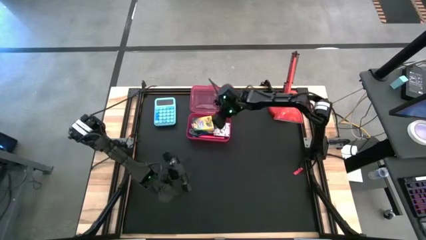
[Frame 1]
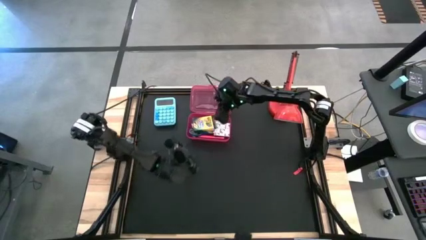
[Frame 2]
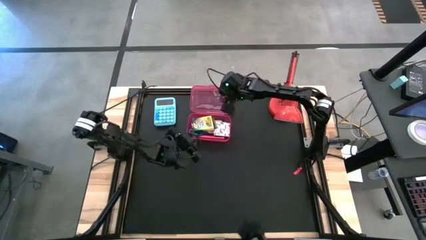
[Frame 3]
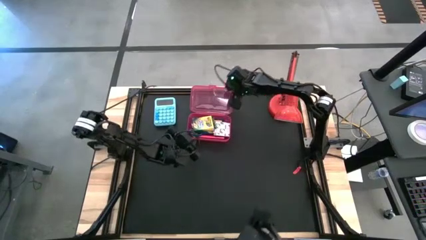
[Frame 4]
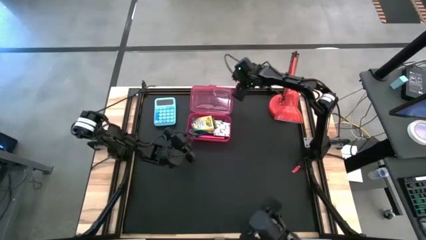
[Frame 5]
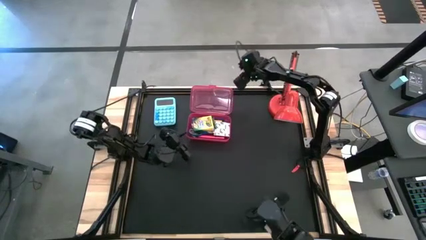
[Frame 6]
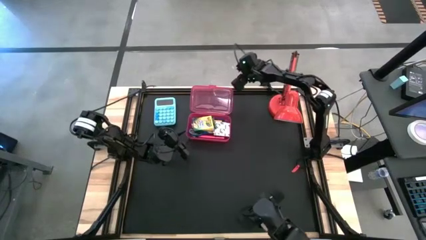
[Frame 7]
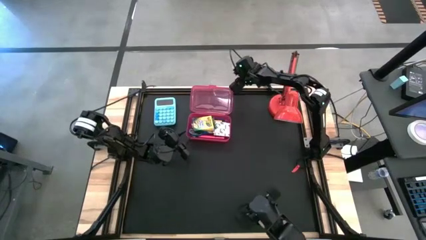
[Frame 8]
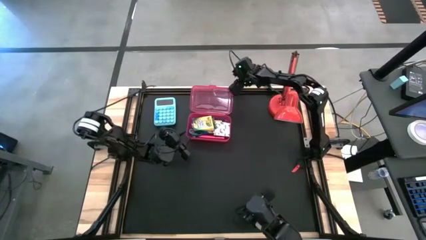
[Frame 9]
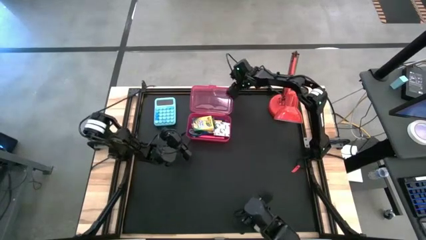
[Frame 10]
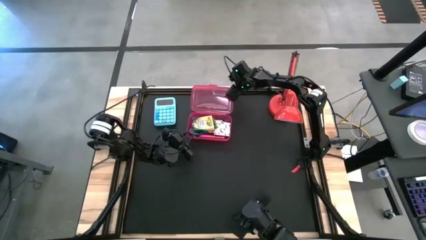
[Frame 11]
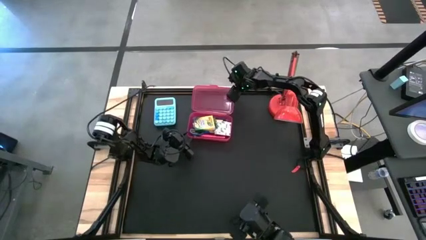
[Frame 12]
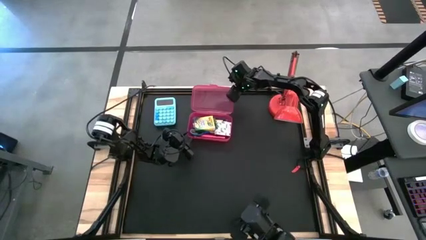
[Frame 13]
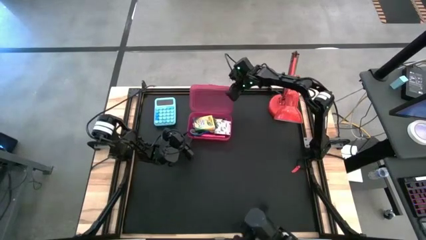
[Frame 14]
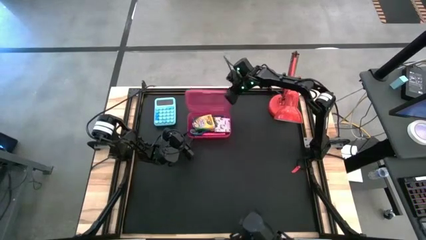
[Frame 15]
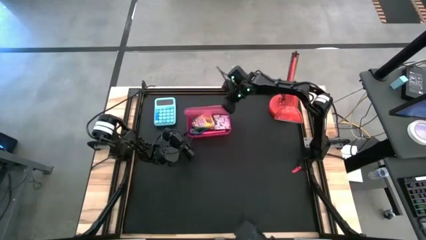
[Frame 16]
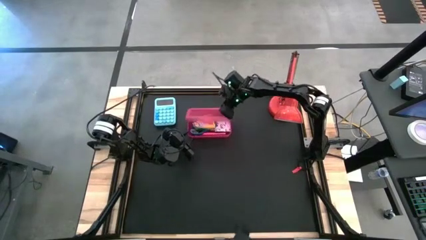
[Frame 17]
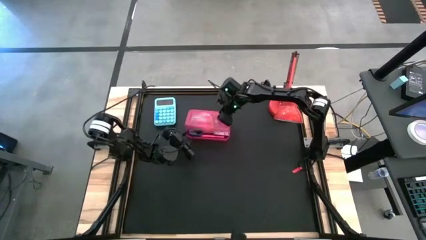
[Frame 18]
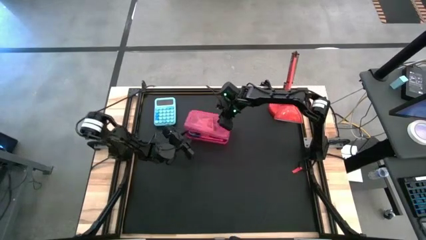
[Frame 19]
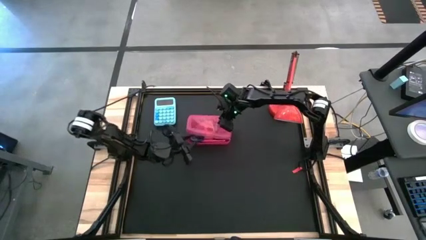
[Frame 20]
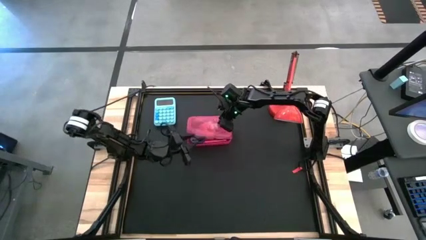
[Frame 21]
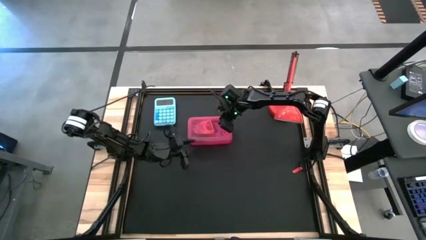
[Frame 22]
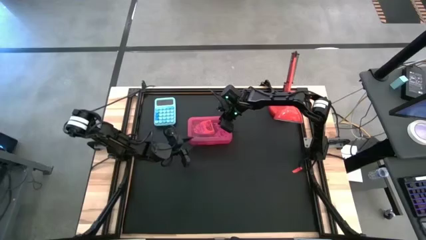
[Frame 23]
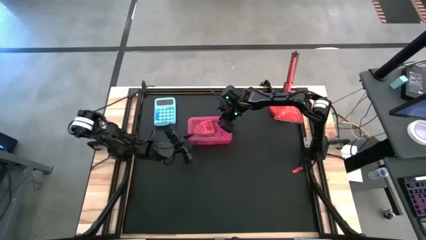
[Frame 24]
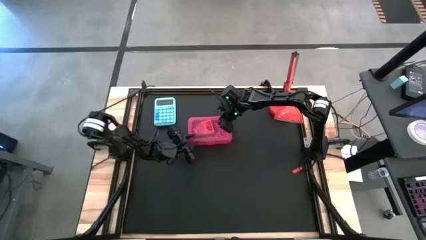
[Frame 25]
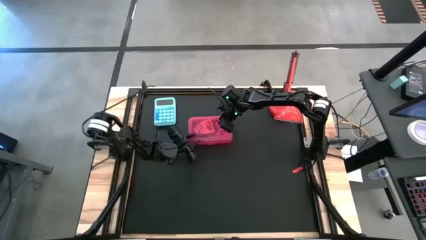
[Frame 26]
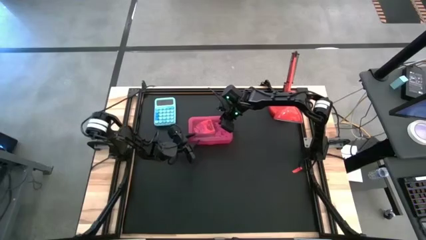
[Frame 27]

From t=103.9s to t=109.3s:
Task: Pack school essentials
Close the pink supply box

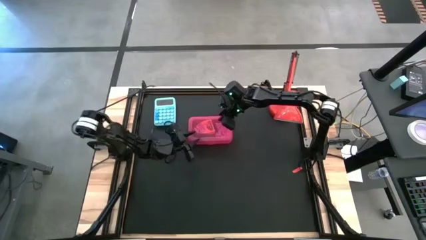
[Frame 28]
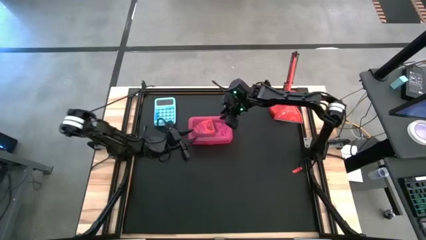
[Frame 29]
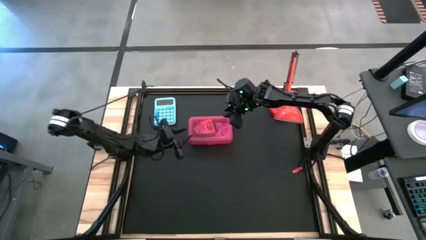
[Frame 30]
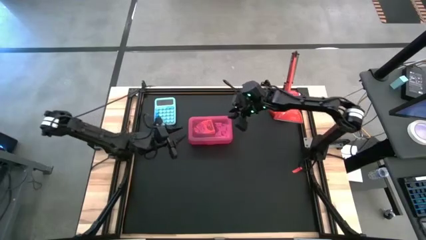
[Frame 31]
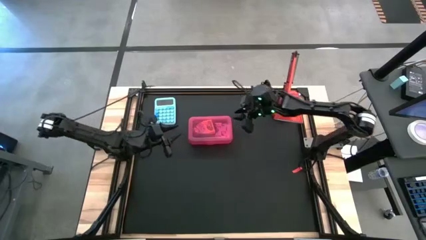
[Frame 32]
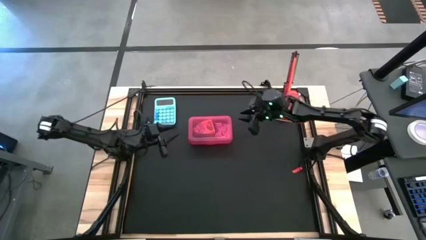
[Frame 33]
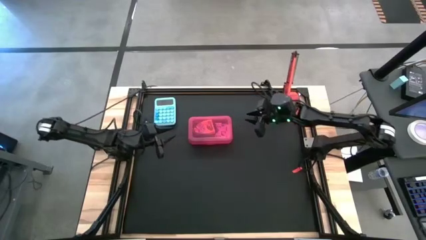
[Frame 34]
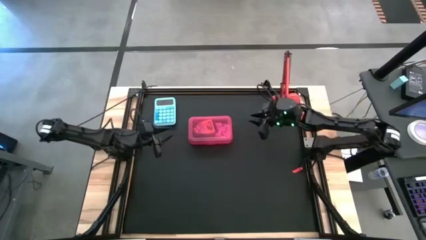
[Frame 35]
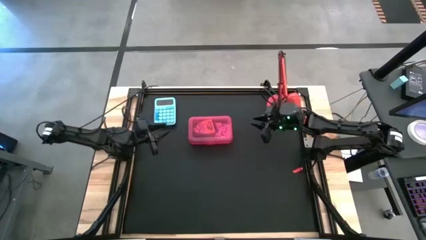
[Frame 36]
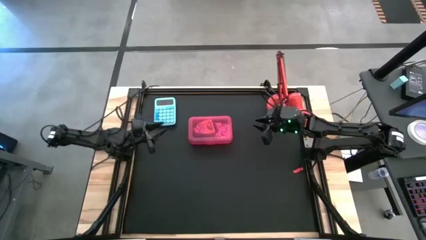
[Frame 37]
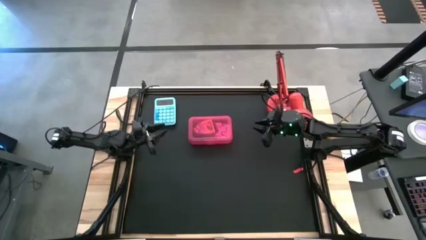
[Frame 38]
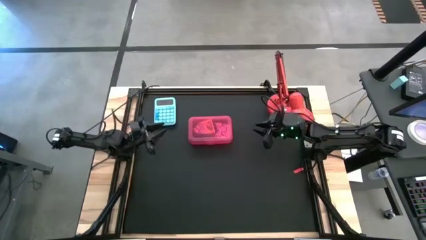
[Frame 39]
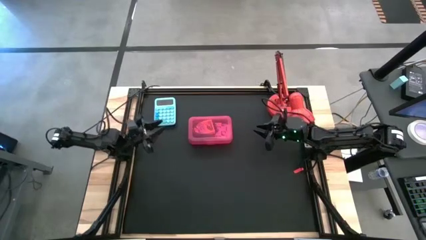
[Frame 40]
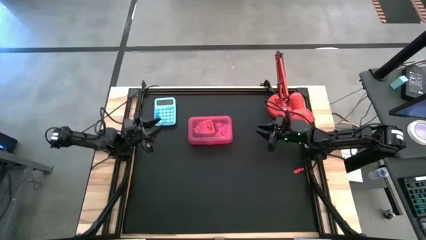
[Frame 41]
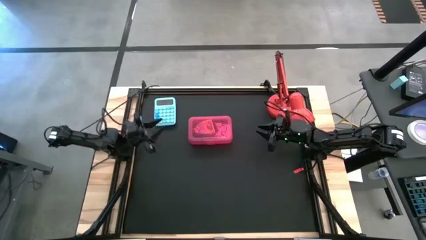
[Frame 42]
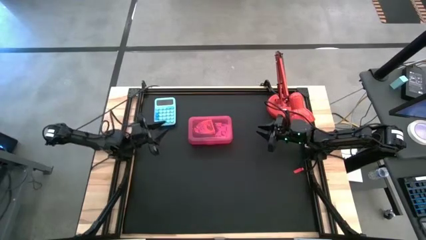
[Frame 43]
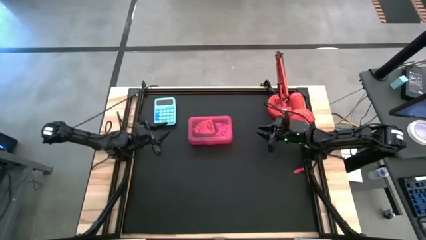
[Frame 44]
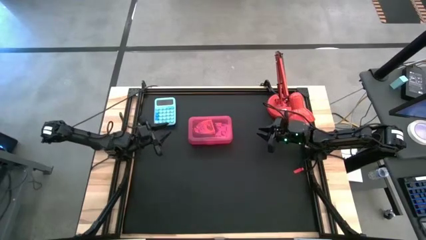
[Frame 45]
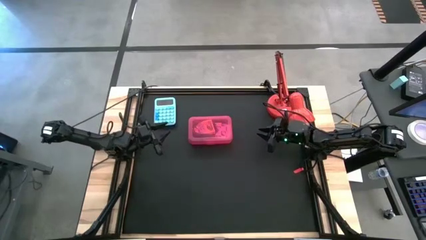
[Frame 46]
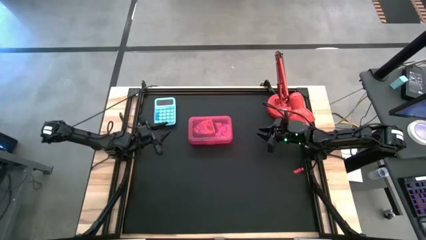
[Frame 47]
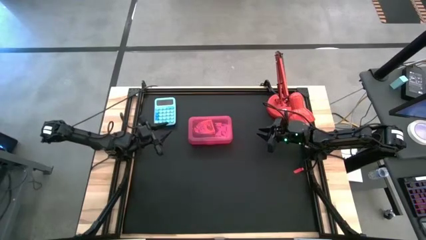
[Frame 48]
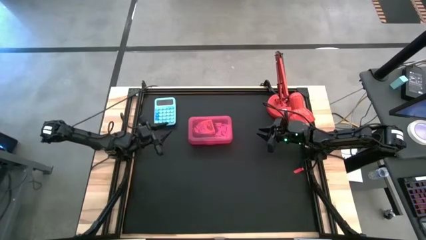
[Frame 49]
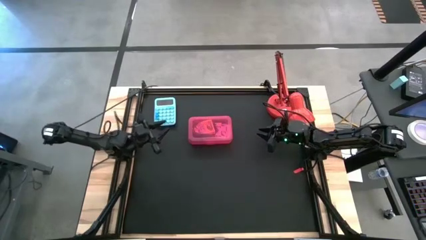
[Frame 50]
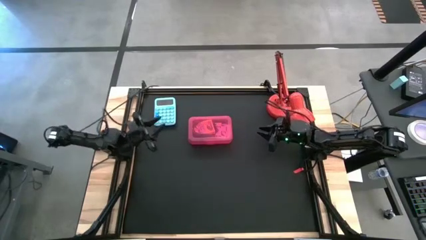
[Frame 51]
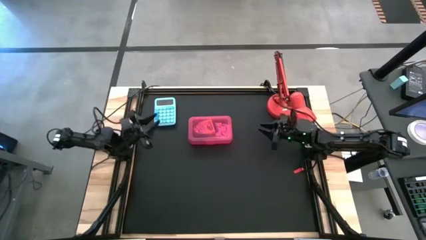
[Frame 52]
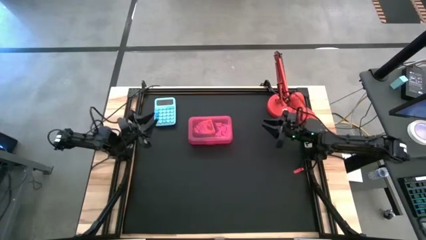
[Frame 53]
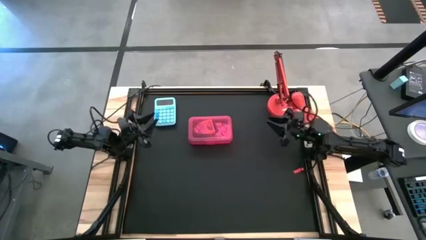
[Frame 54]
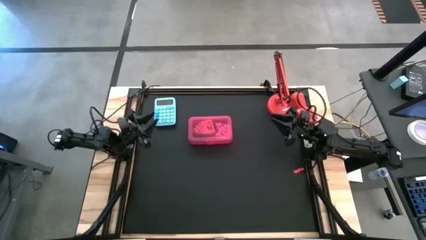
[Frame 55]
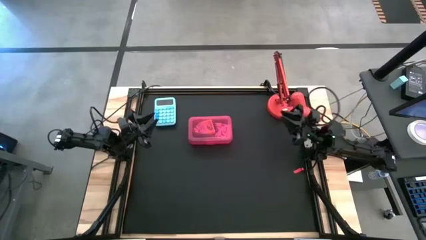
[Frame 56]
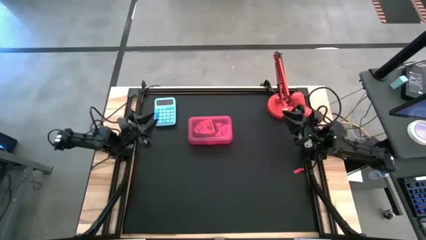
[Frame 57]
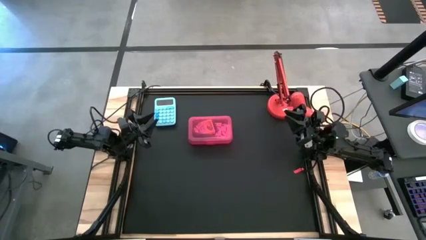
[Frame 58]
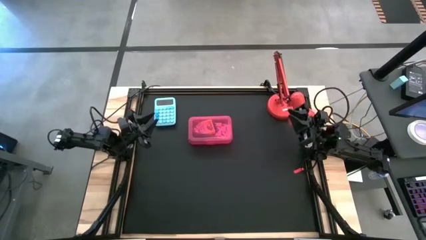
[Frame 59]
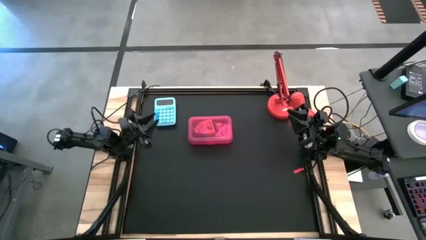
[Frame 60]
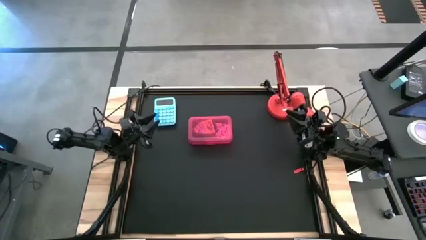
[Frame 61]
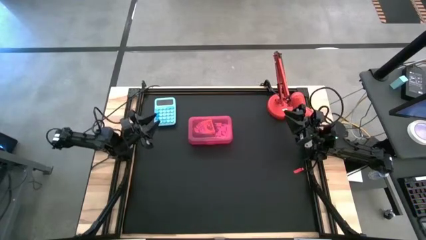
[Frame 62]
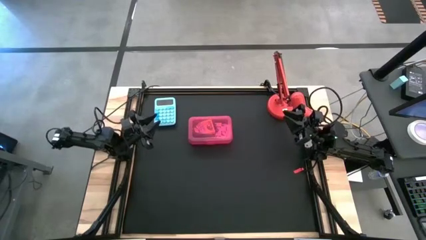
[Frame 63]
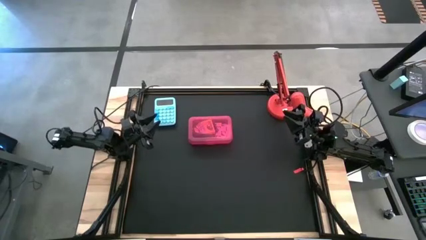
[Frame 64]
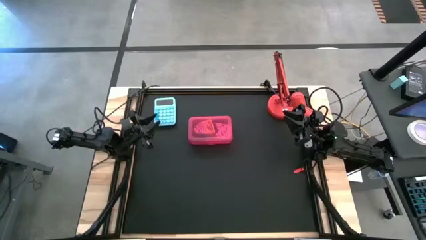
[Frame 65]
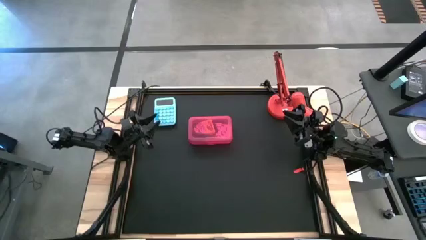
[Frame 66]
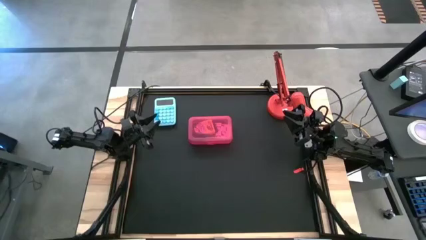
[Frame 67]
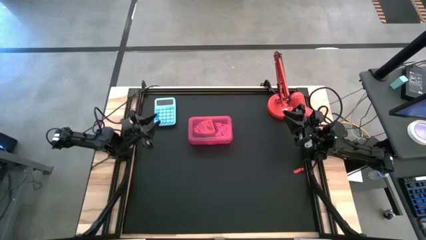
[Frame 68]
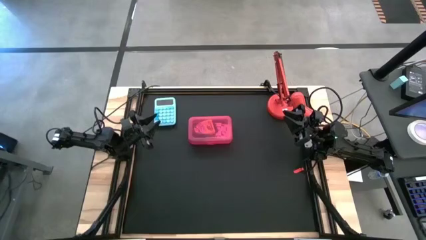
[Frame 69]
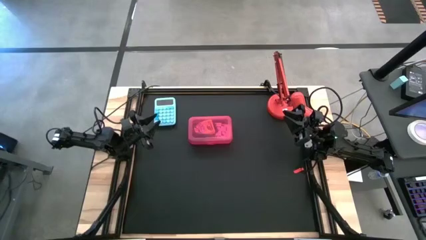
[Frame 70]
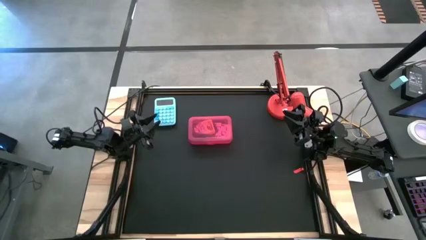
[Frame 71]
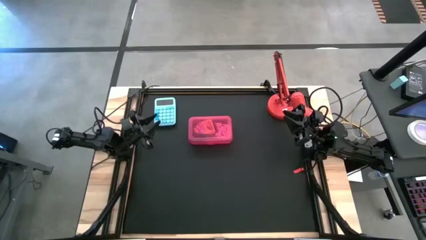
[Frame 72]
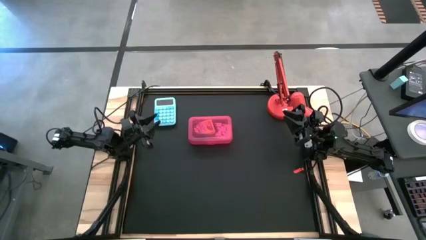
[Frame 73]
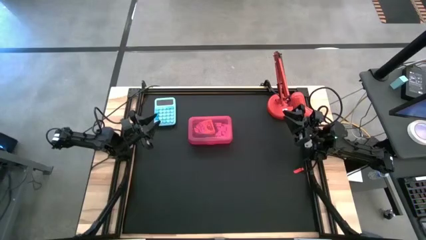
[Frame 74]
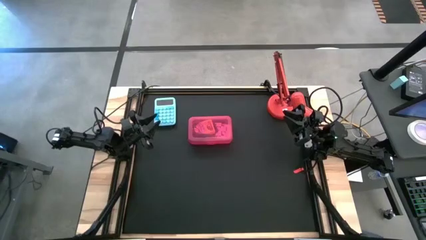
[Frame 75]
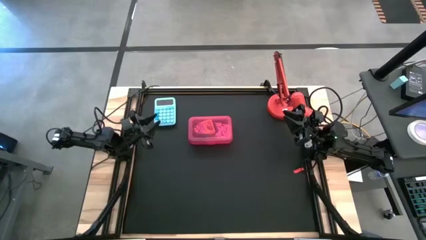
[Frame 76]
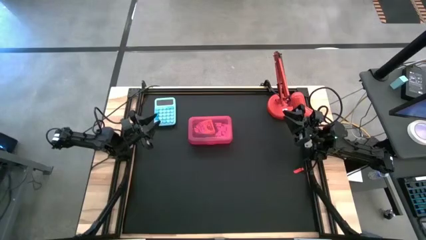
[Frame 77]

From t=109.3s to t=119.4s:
Return to Home Position
